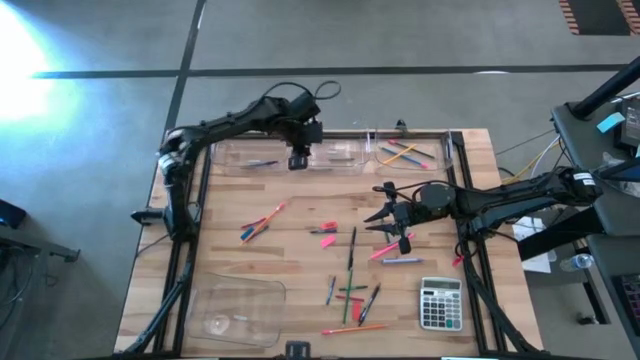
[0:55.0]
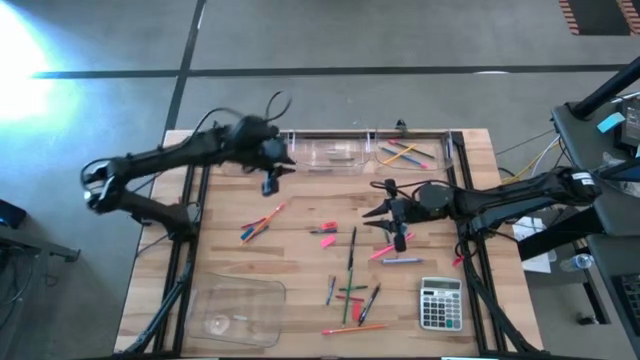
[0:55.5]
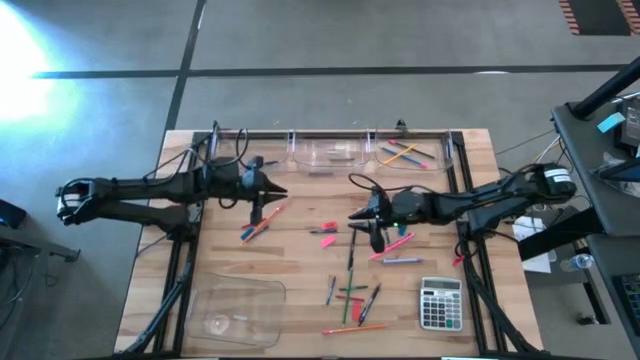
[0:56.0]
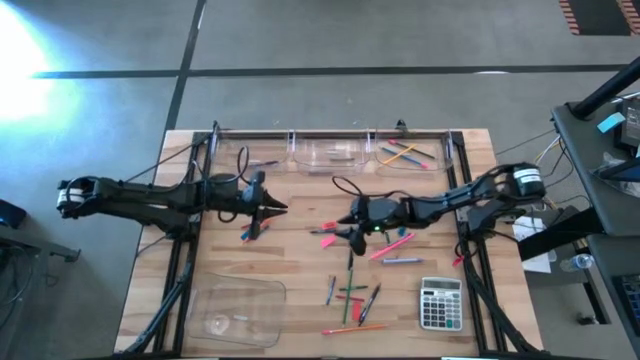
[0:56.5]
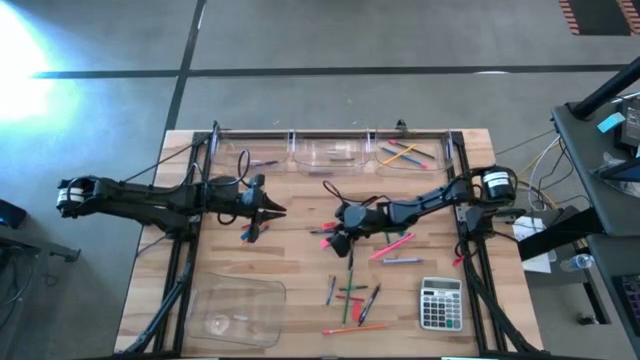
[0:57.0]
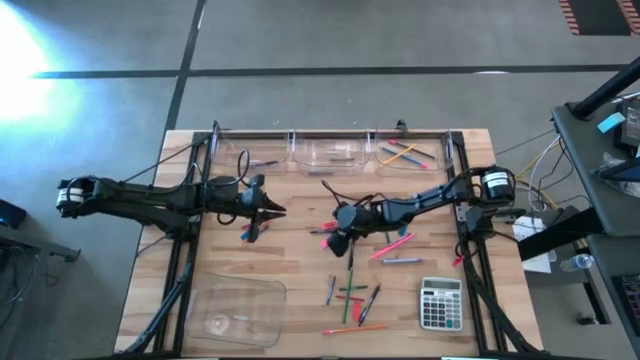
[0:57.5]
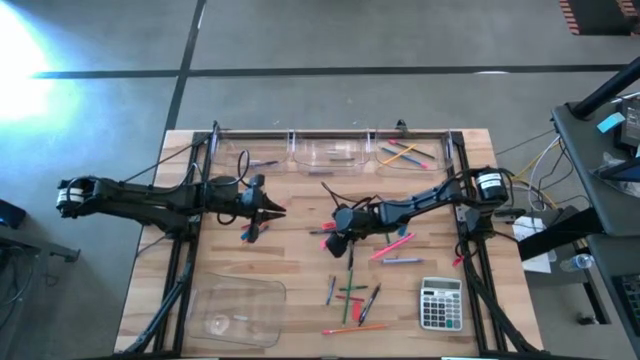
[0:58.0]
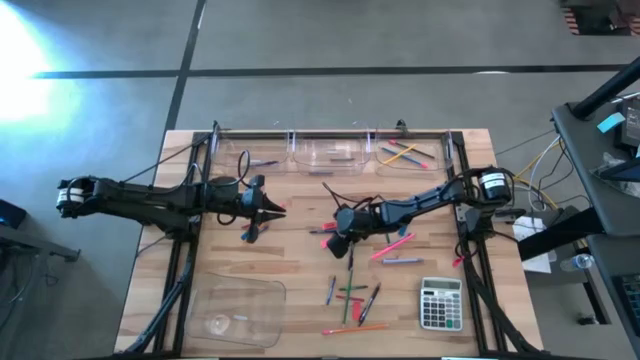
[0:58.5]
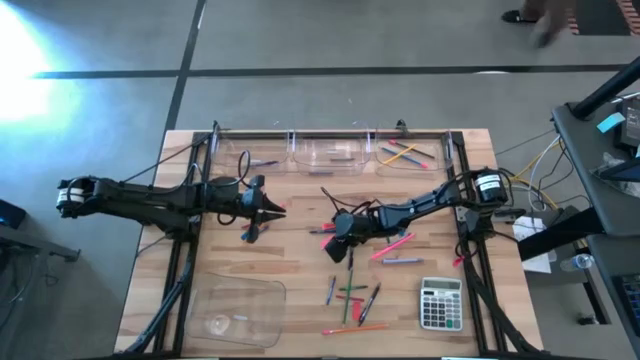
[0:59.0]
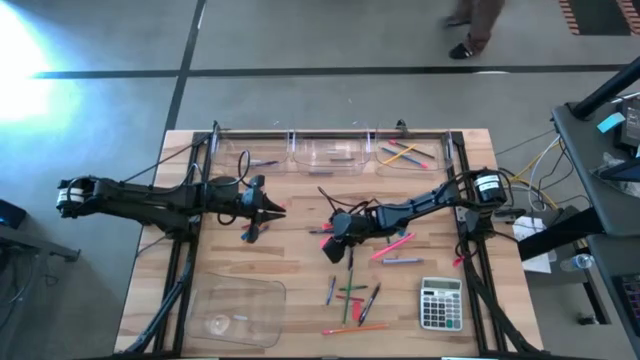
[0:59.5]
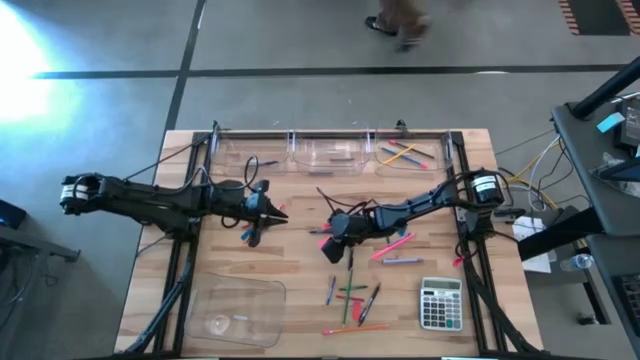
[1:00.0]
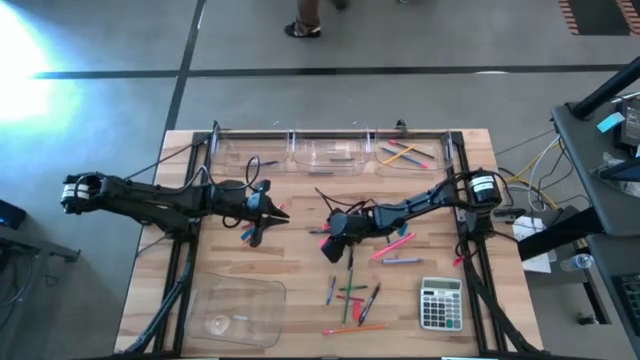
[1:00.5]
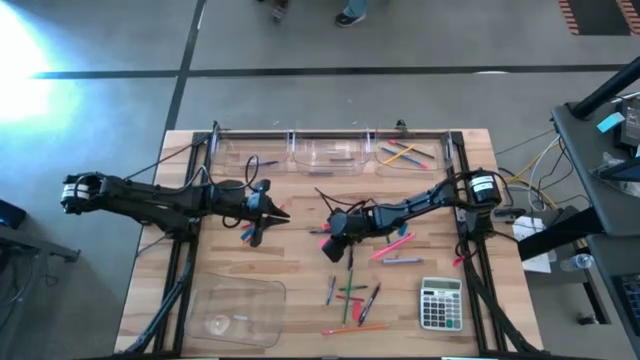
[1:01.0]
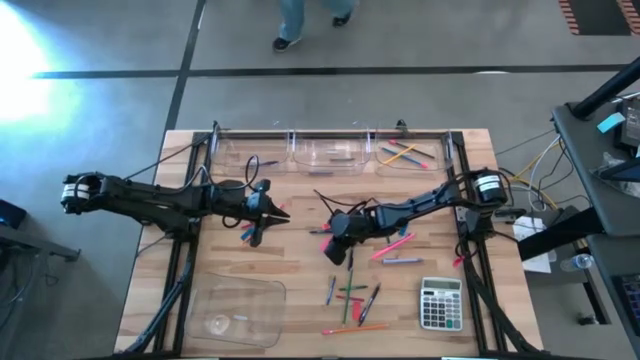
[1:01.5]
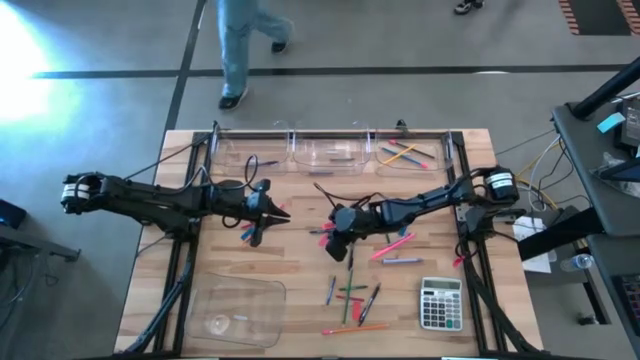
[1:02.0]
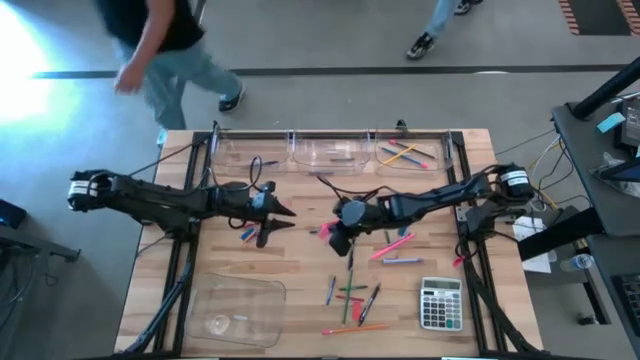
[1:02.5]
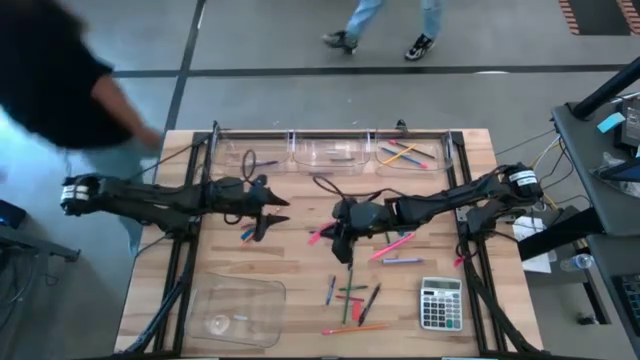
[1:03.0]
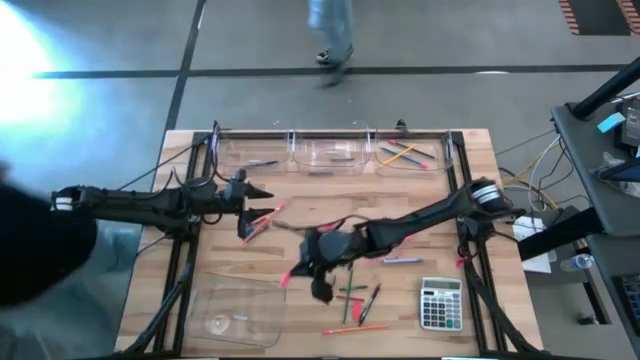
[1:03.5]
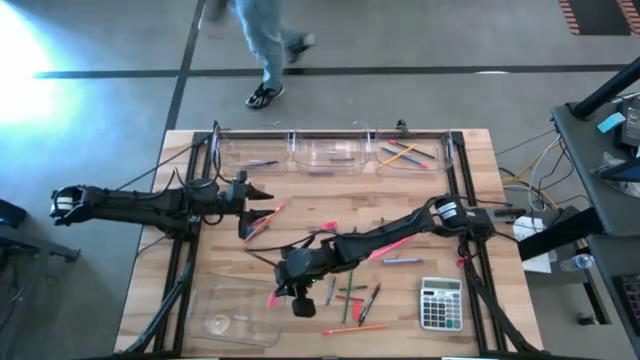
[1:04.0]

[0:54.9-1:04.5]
Task: Sort crayons/erasers/pens/pencils in bins
Put the pink eraser into the bottom transparent bin

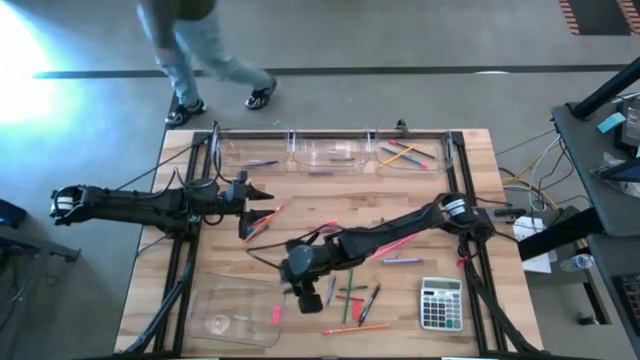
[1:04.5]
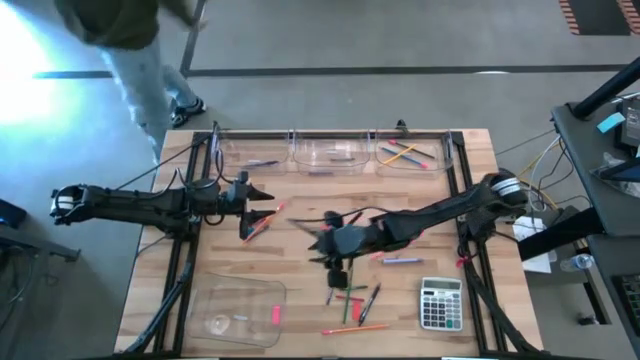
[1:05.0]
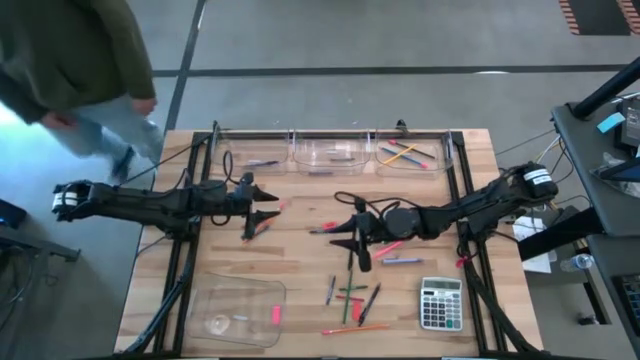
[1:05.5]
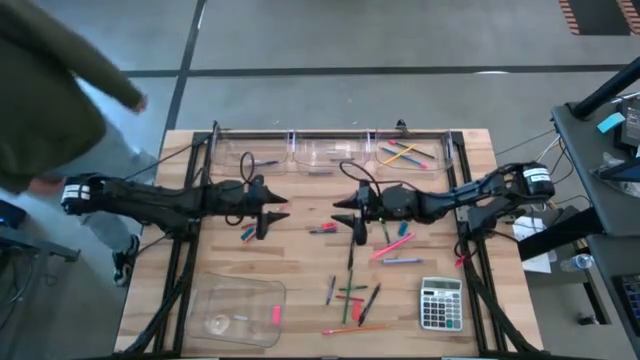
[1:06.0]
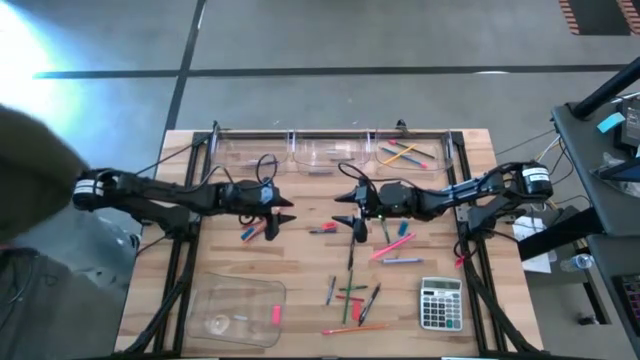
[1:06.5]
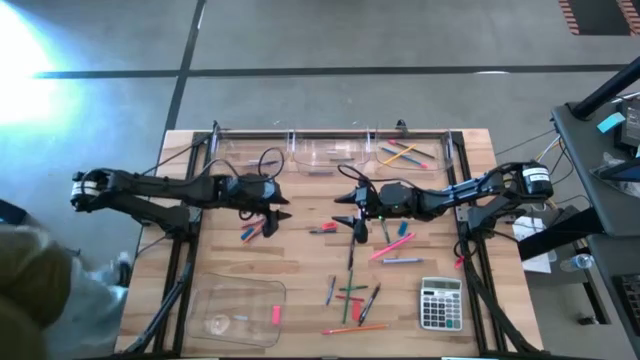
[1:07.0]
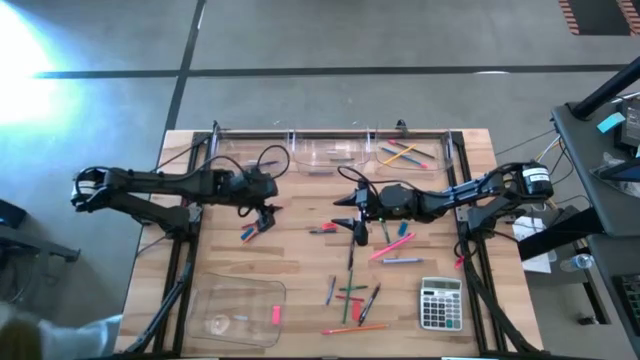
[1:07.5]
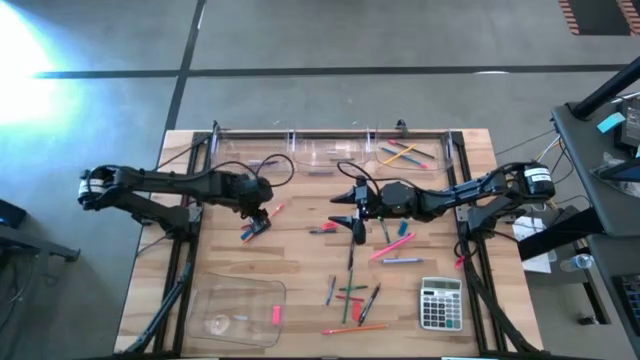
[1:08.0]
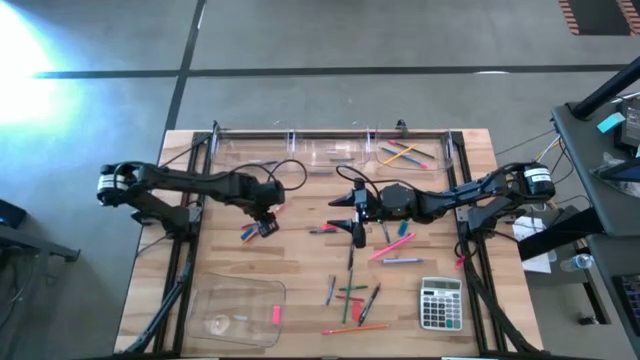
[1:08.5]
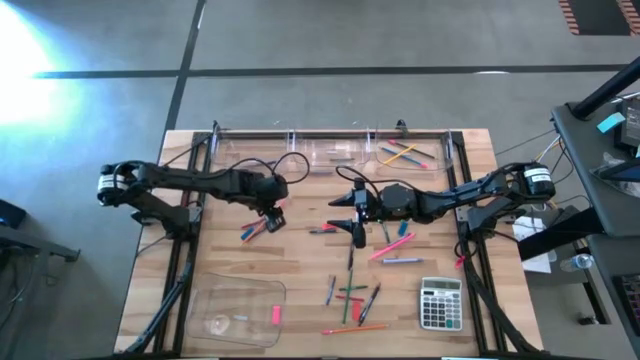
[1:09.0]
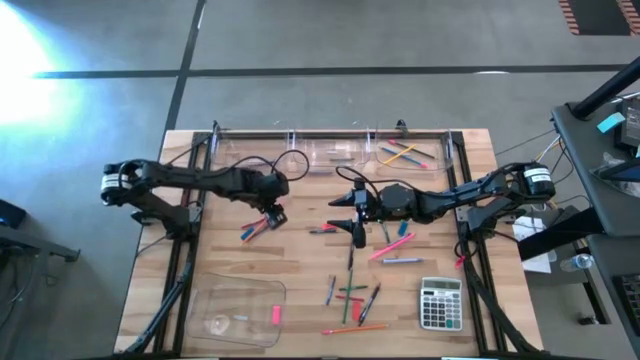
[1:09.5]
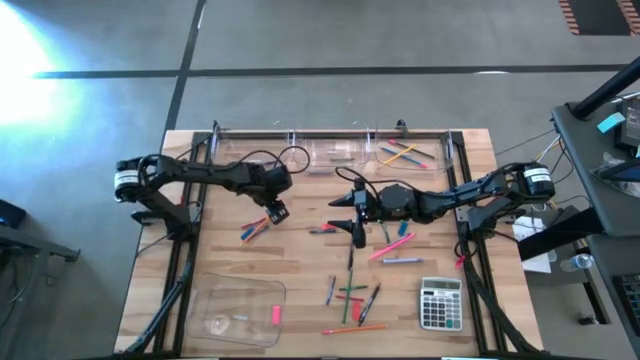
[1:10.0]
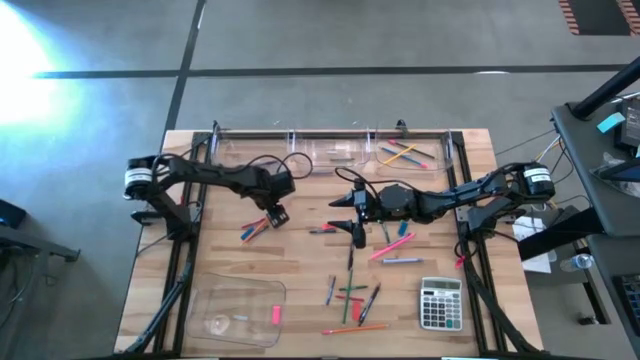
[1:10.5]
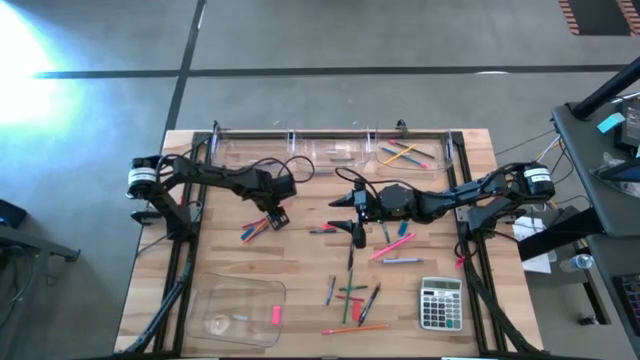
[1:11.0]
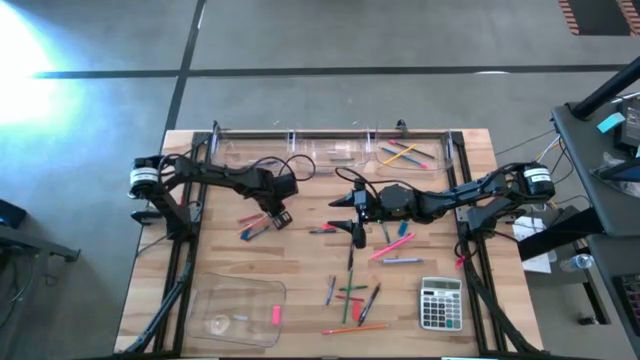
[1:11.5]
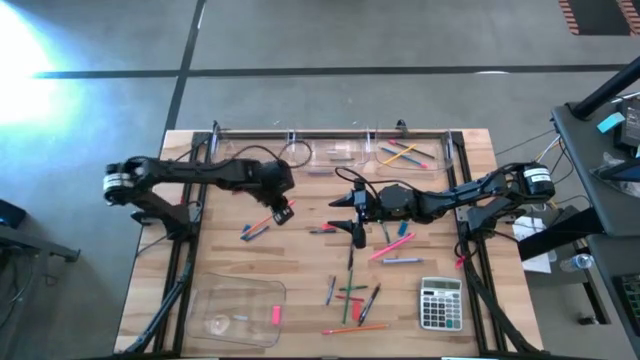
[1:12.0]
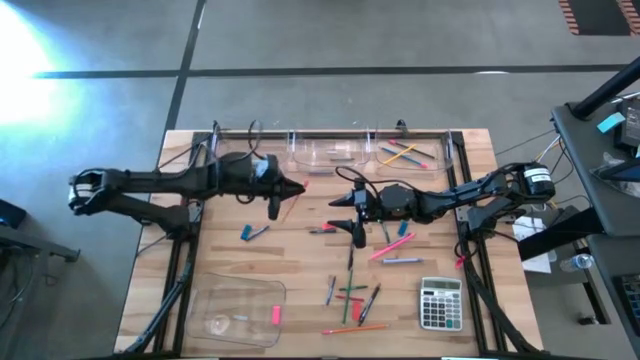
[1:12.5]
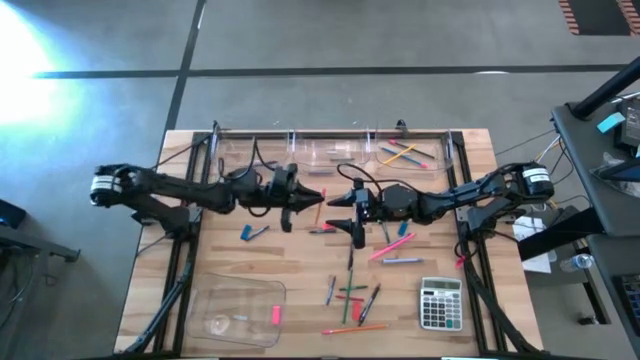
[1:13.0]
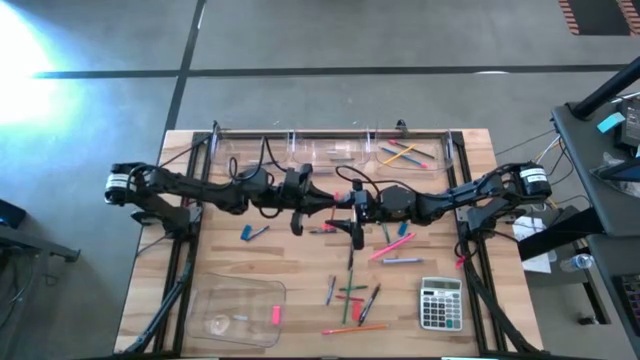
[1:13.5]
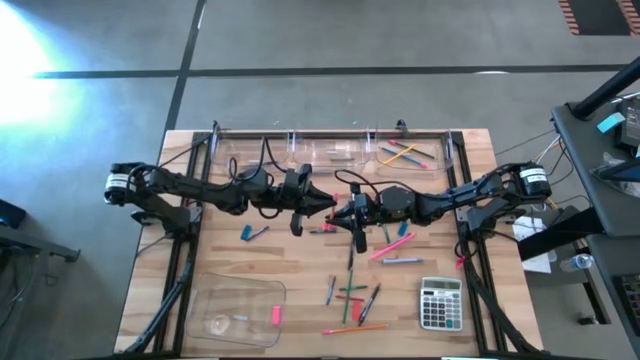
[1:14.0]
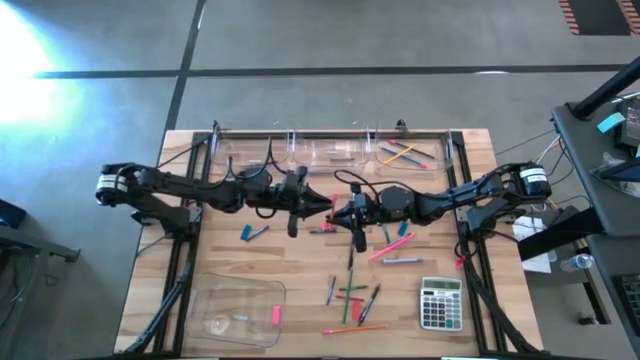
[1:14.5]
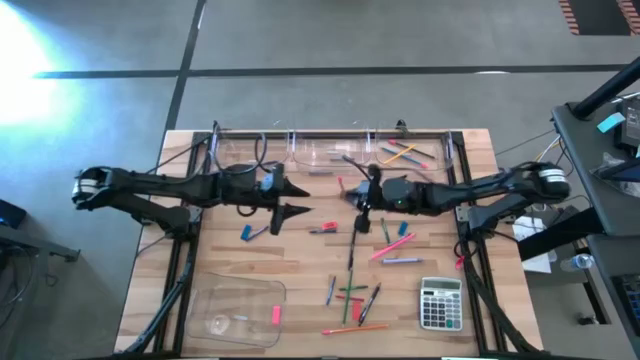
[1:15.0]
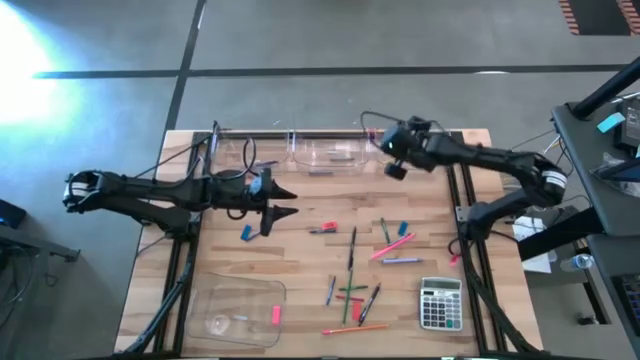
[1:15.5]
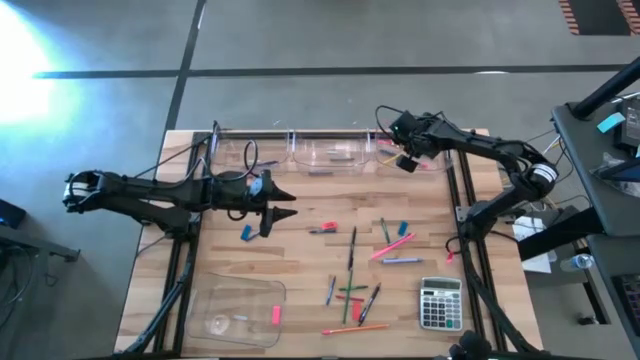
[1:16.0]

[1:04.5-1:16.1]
Put the orange pencil into the top right transparent bin
